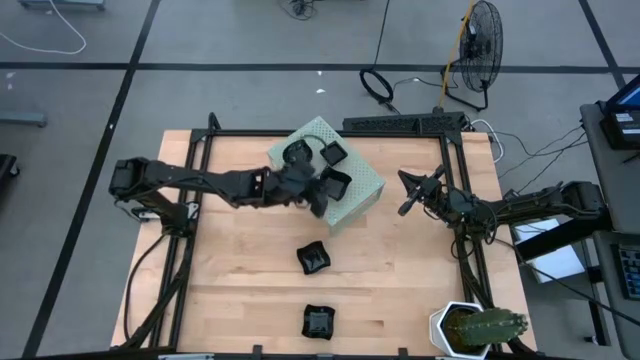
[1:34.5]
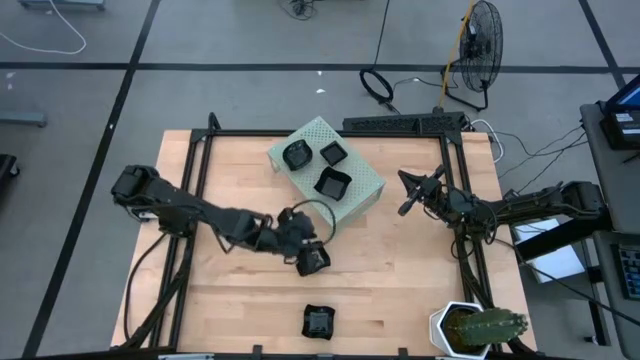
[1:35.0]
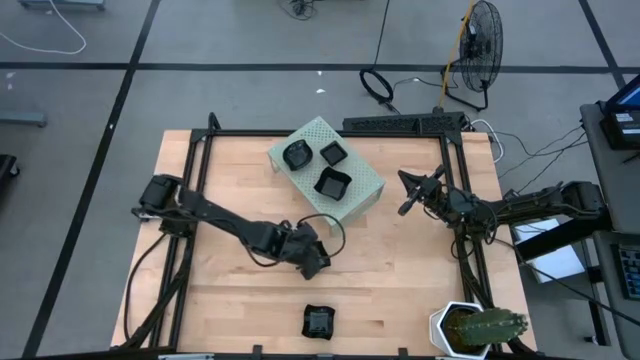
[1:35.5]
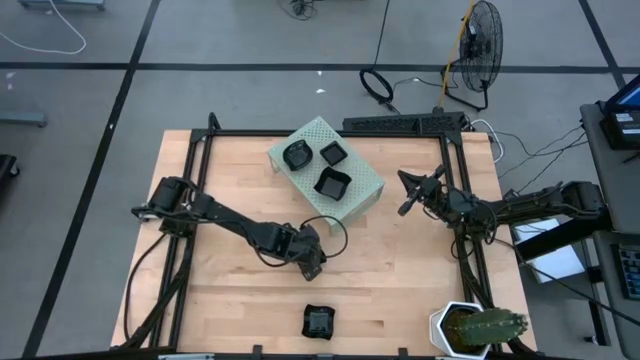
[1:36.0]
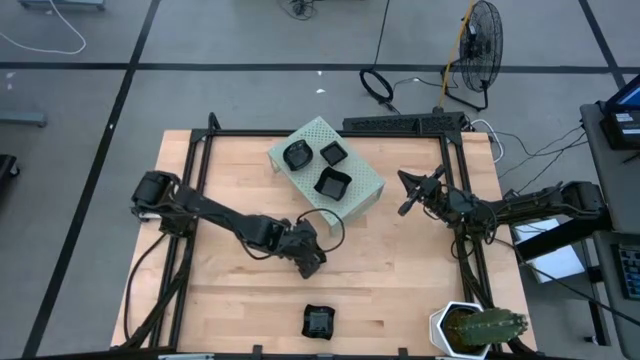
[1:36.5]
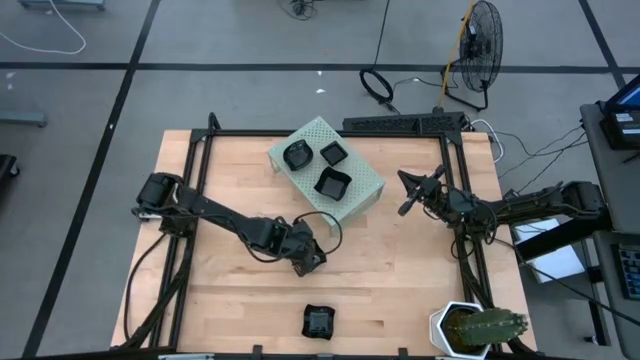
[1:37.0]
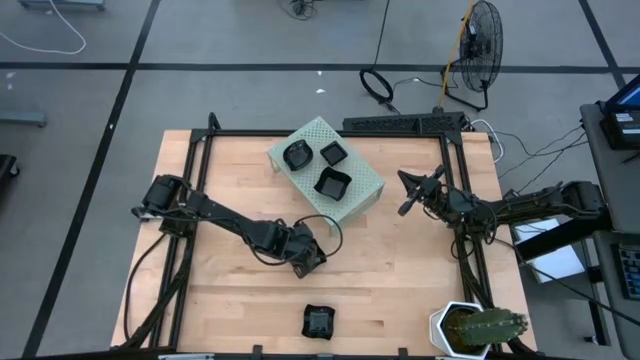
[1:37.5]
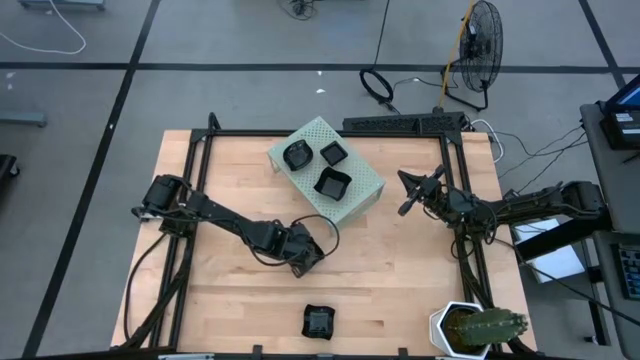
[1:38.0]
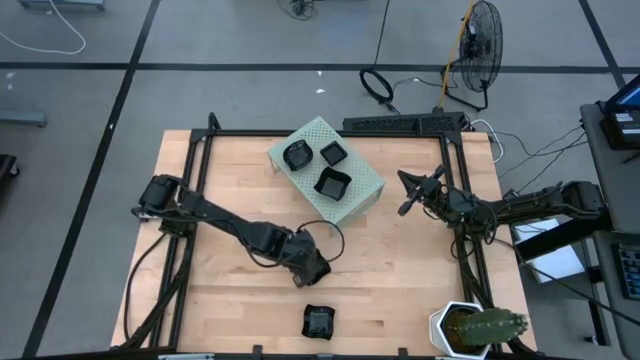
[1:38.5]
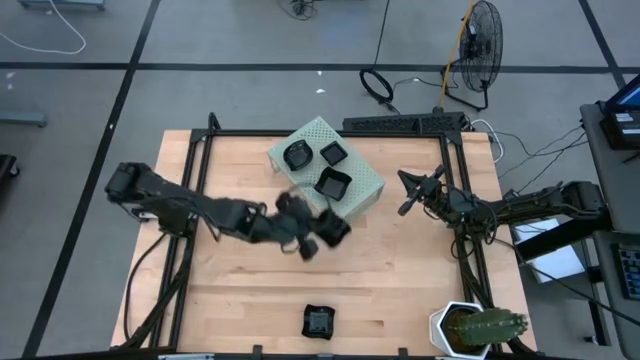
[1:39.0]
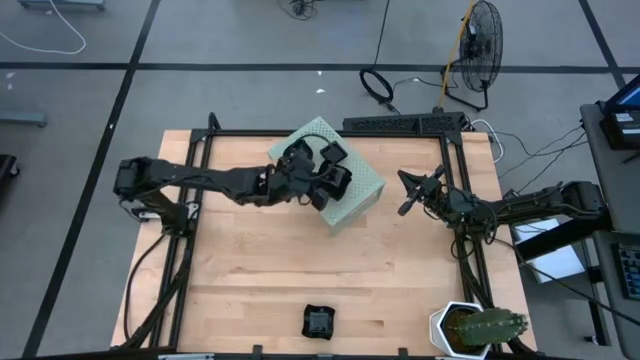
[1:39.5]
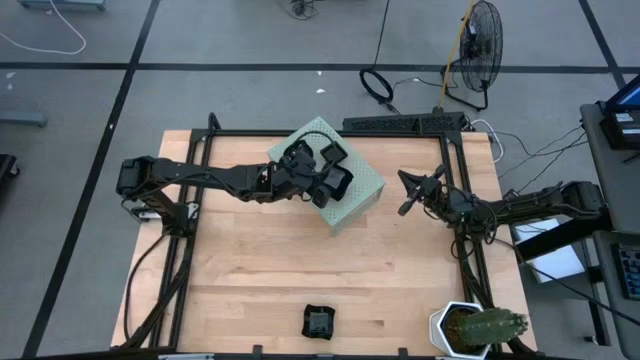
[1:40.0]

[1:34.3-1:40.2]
Task: Pick & Place Mini shaped plates
Stack the distorted square plate on top of the other distorted square plate on the shelf

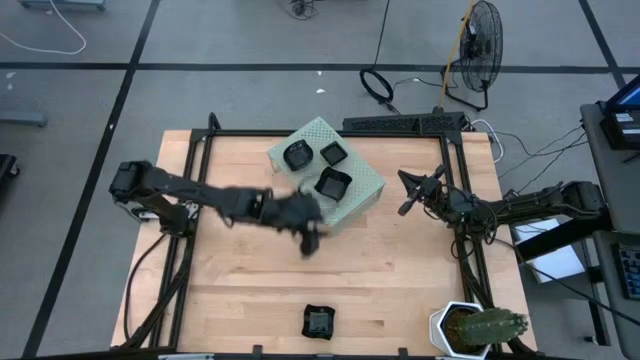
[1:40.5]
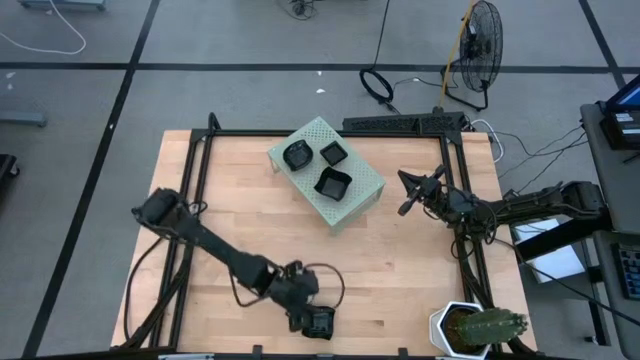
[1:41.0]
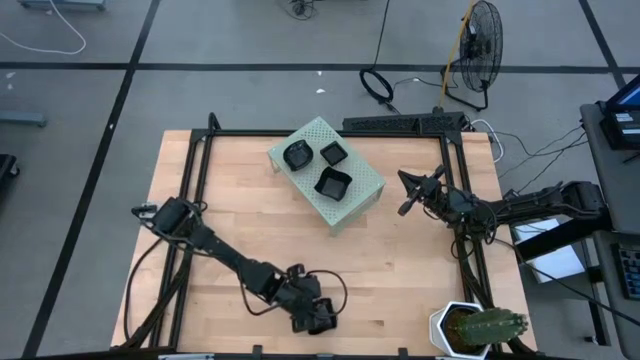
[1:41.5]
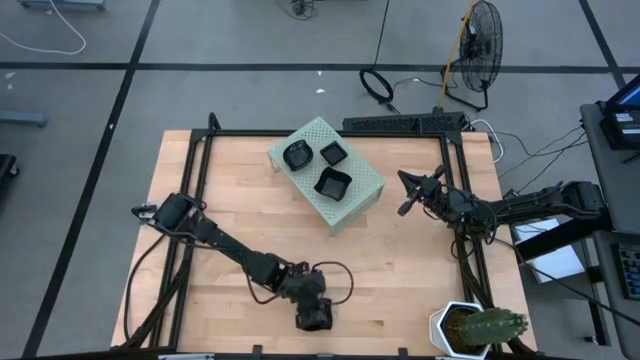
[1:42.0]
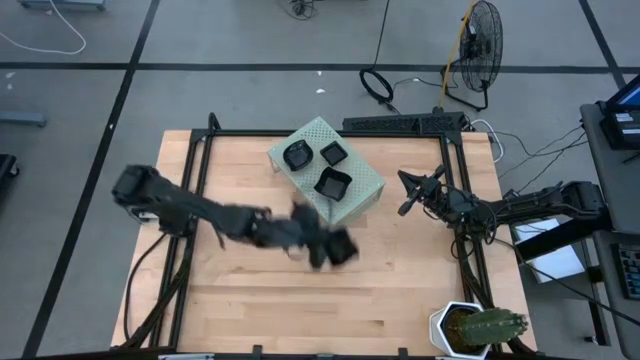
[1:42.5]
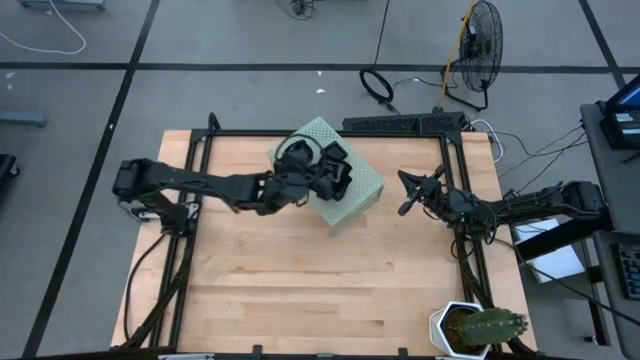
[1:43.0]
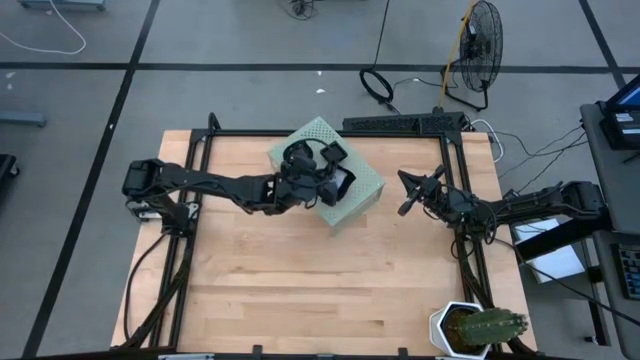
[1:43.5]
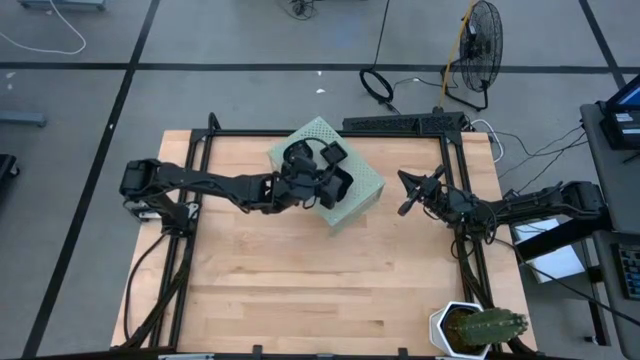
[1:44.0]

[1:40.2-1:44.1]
Stack the distorted square plate on top of the other distorted square plate on the shelf

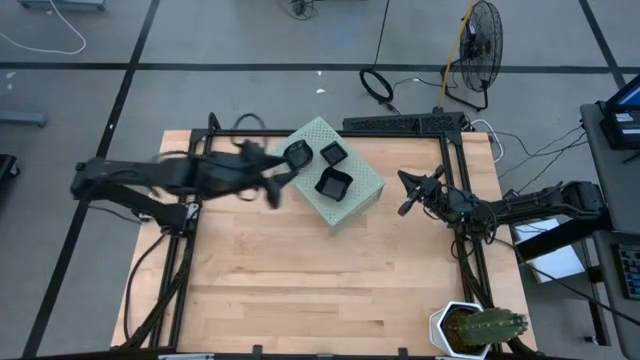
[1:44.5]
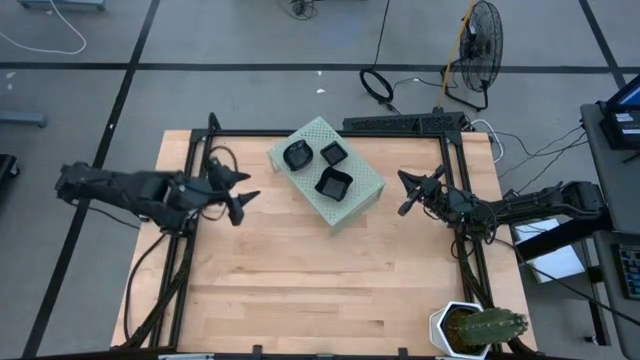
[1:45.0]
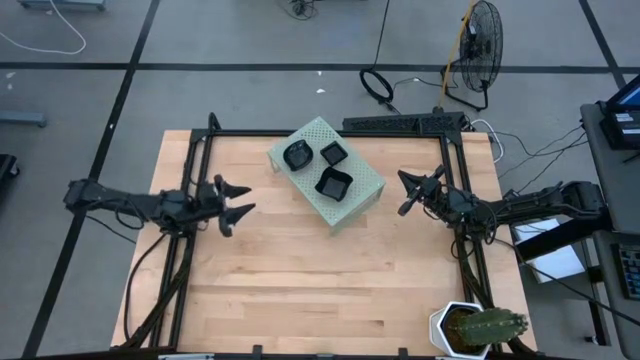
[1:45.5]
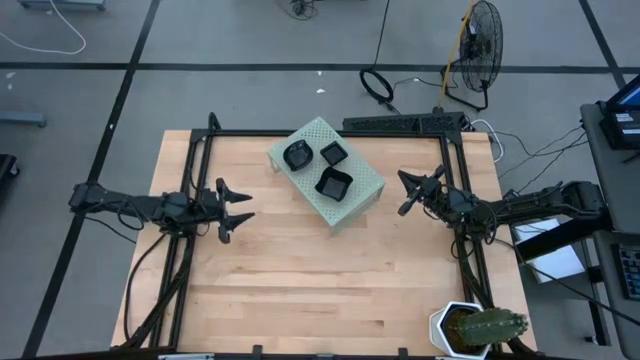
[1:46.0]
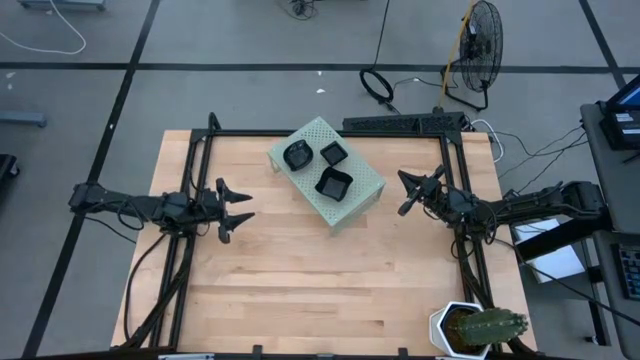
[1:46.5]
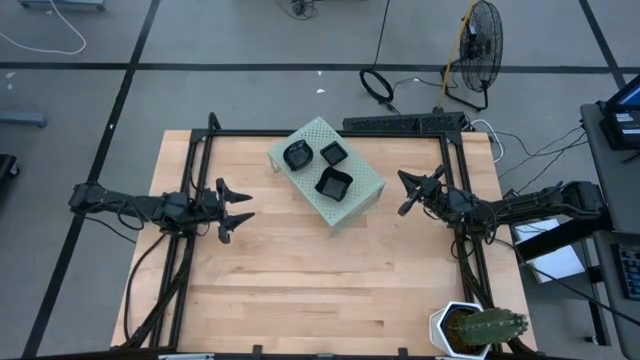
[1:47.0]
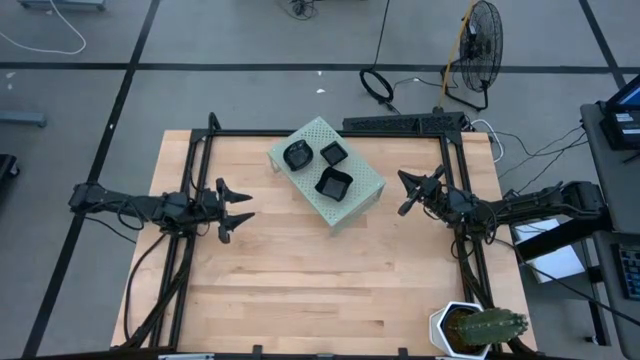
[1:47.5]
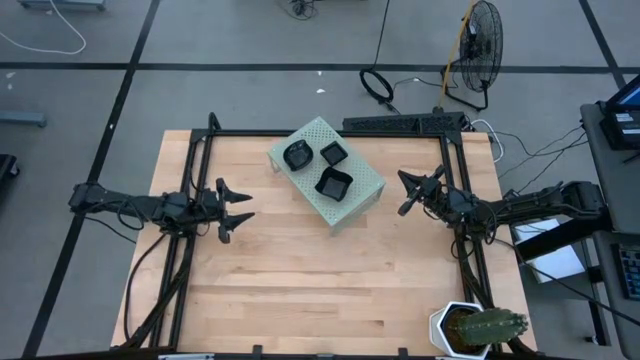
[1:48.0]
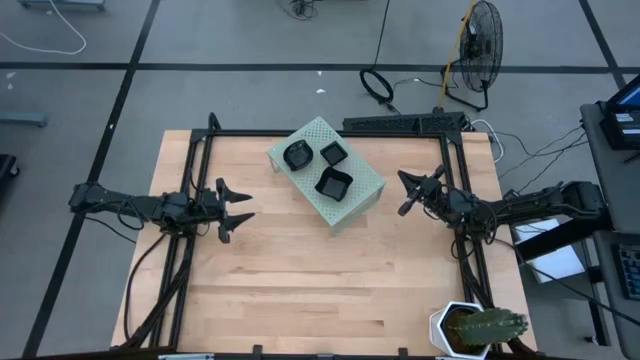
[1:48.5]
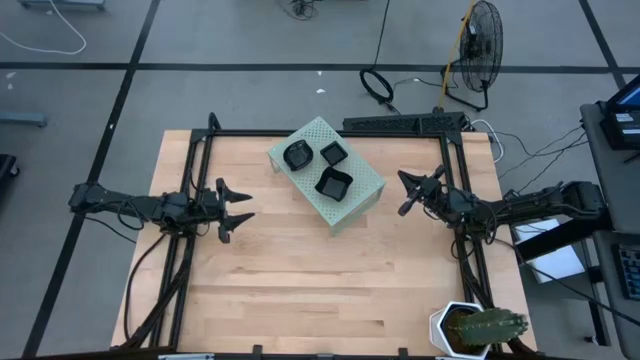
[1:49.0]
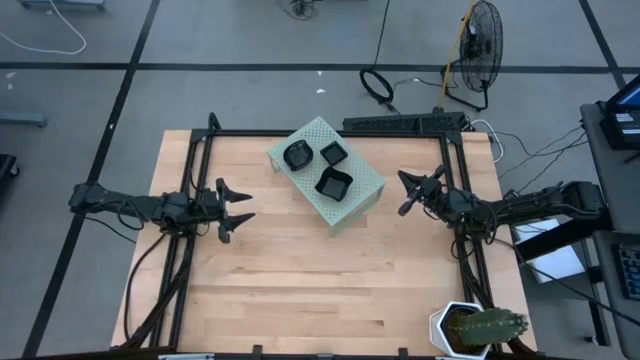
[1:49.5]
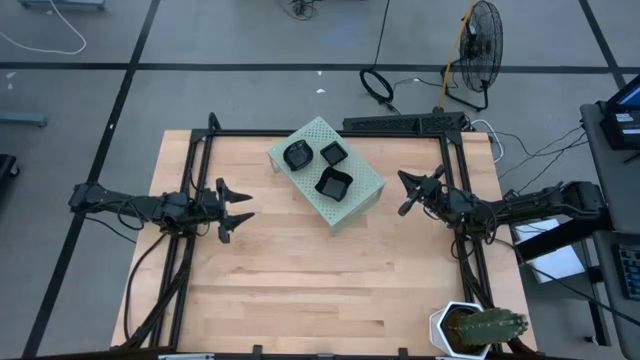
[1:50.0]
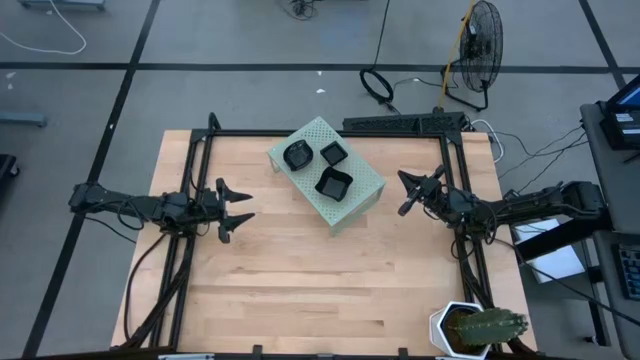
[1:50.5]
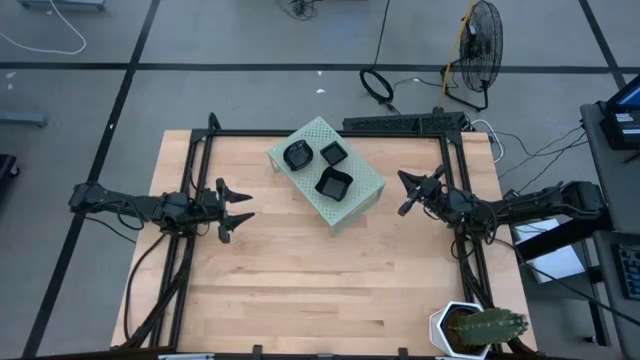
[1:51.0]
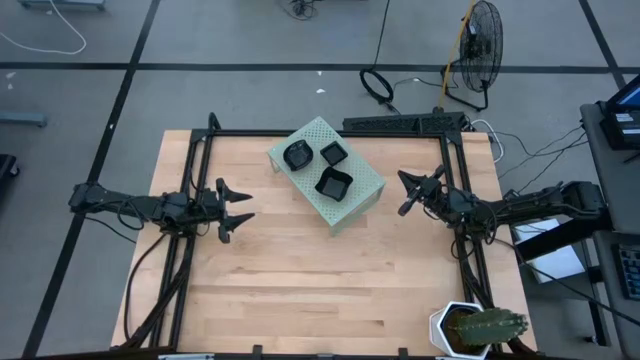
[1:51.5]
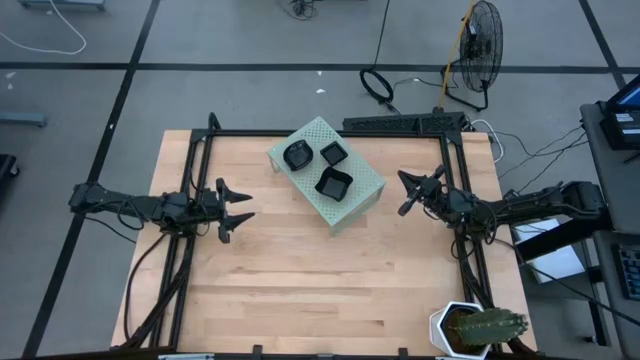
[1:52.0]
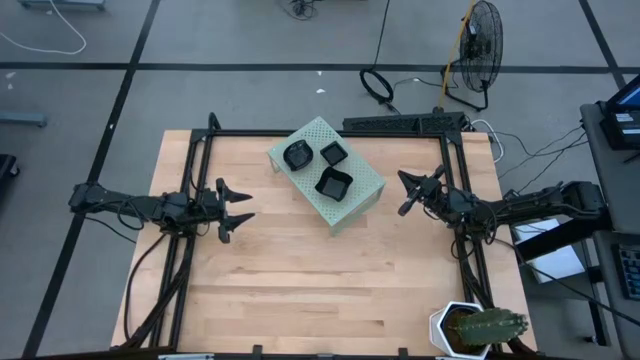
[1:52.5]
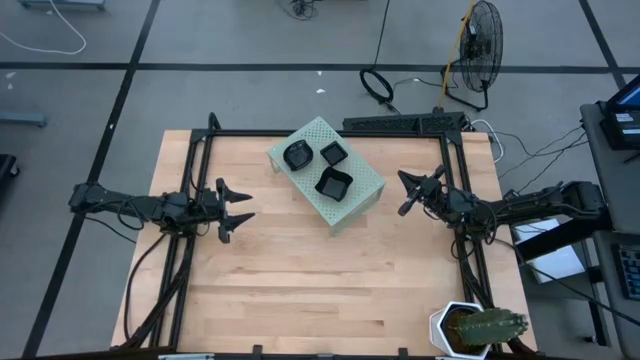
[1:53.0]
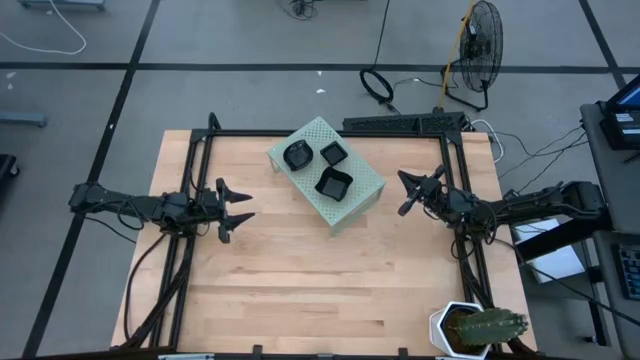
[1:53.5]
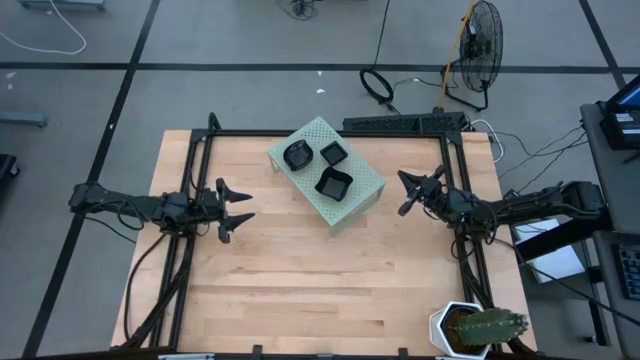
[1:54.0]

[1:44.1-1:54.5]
Return to Home Position

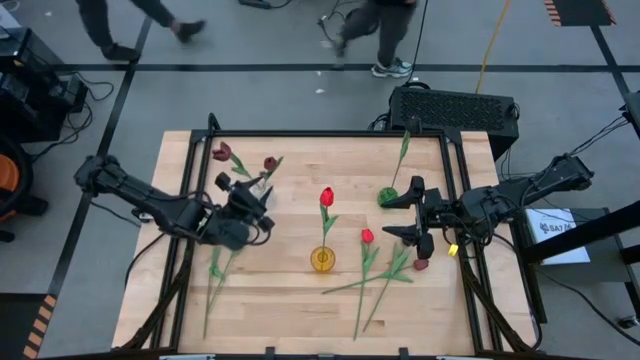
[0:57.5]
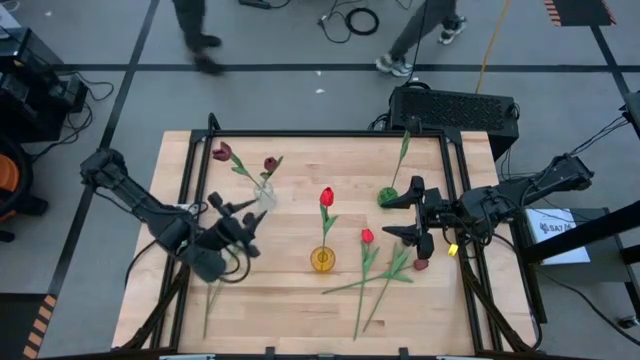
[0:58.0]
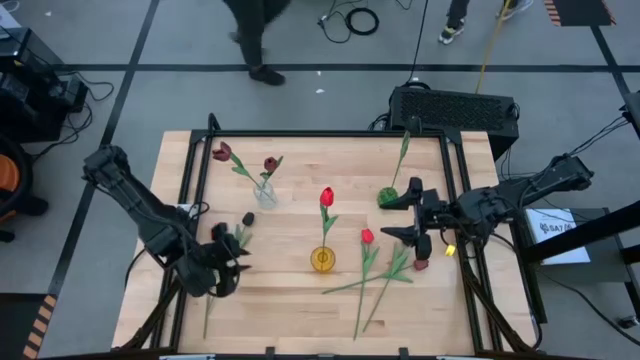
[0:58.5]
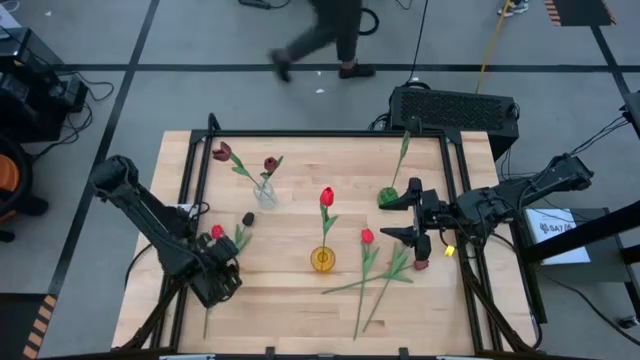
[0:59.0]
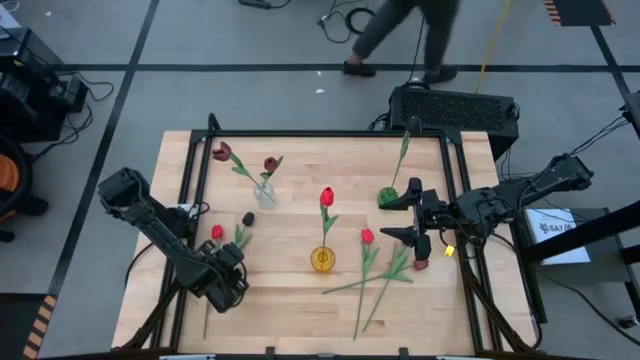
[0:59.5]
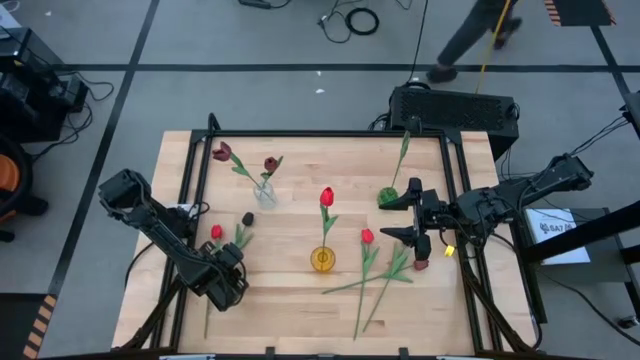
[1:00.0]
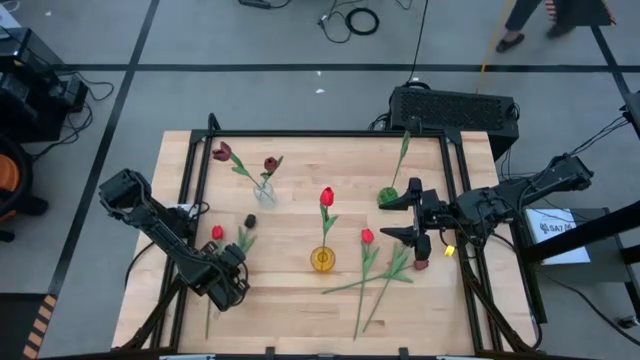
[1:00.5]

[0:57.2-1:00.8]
Task: Sort flowers into vase by color
Put the left black flower into the green vase
